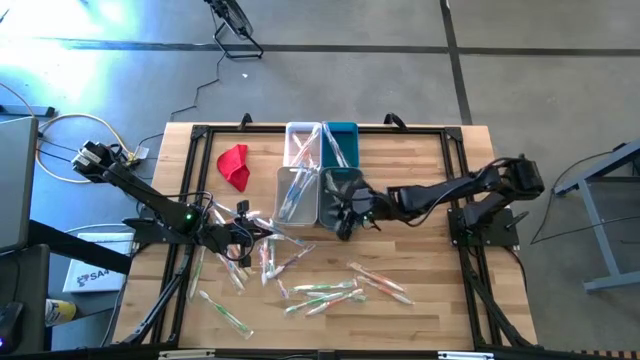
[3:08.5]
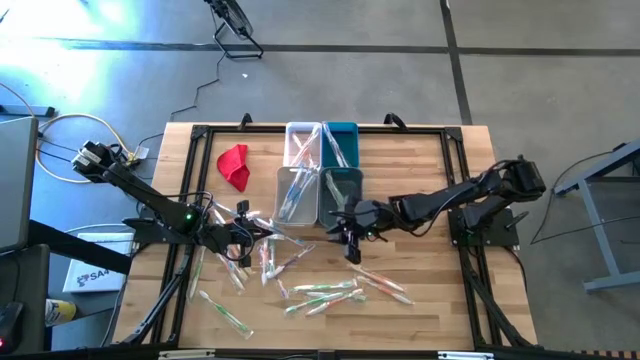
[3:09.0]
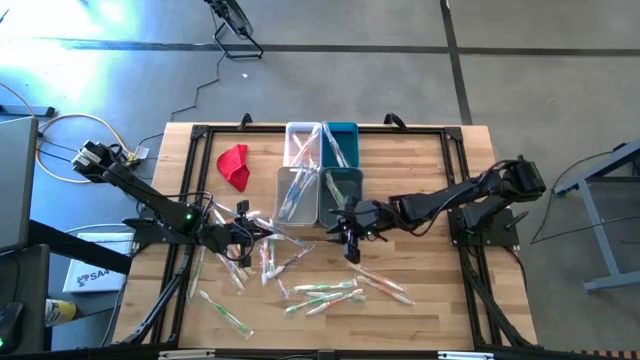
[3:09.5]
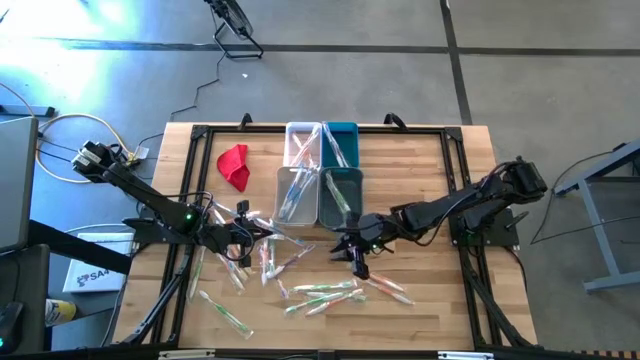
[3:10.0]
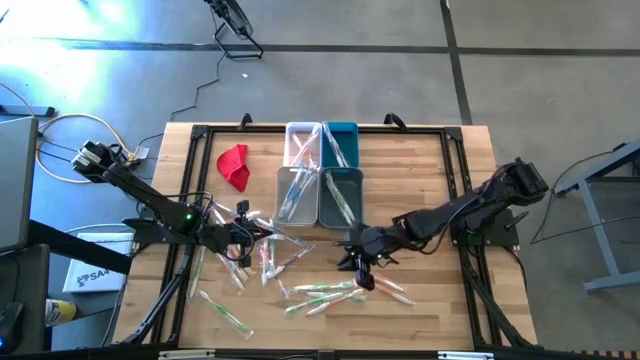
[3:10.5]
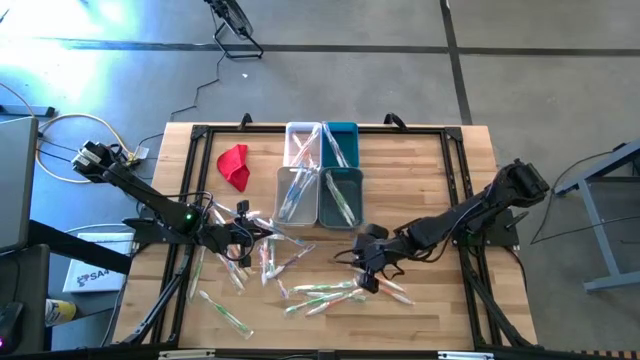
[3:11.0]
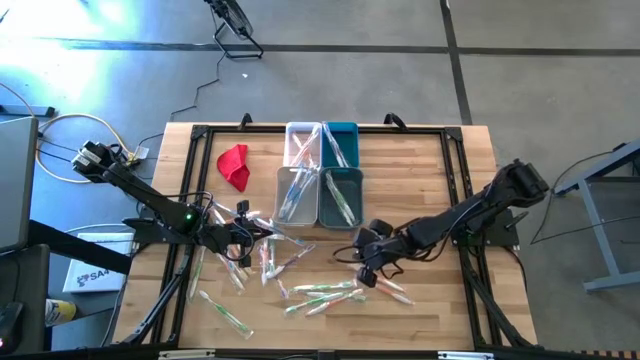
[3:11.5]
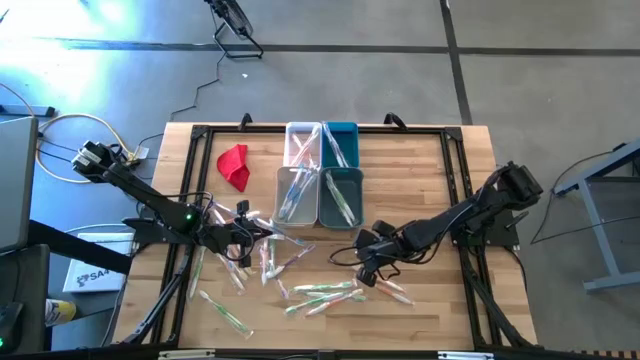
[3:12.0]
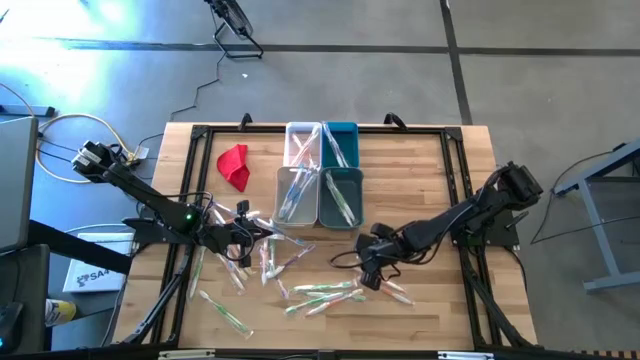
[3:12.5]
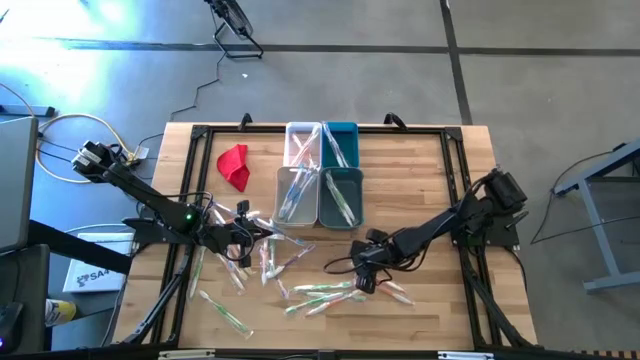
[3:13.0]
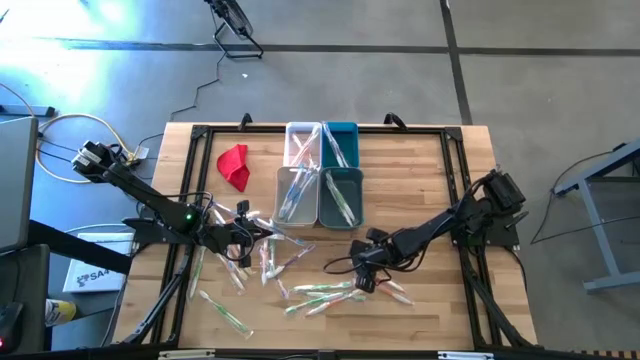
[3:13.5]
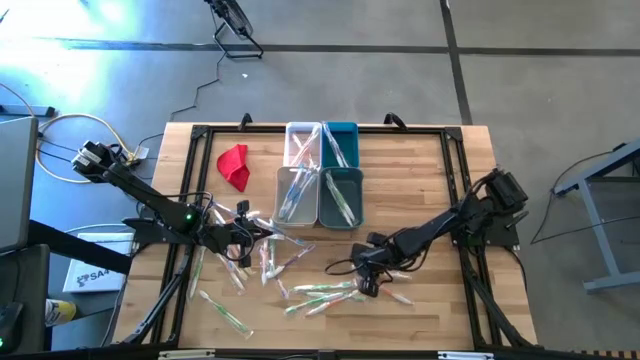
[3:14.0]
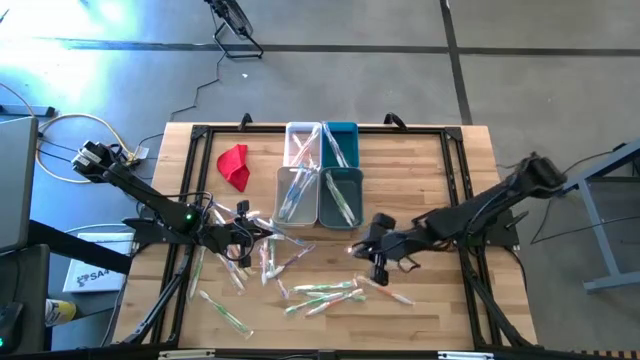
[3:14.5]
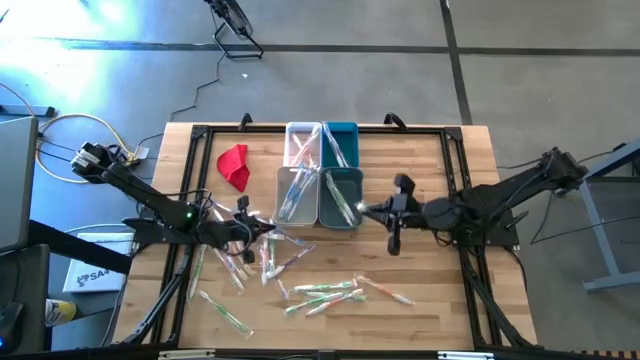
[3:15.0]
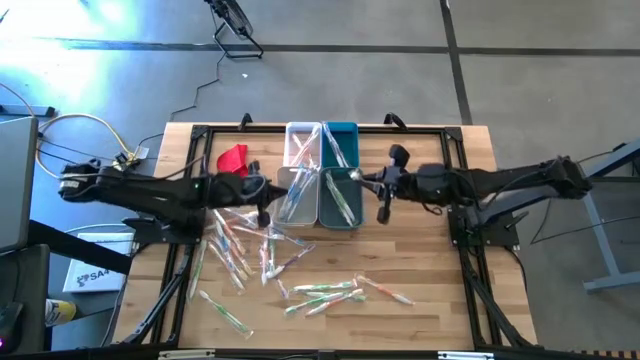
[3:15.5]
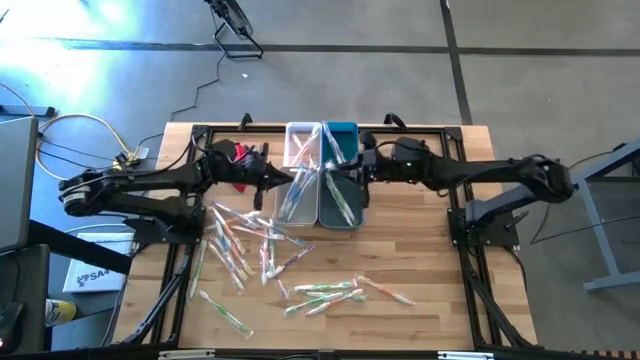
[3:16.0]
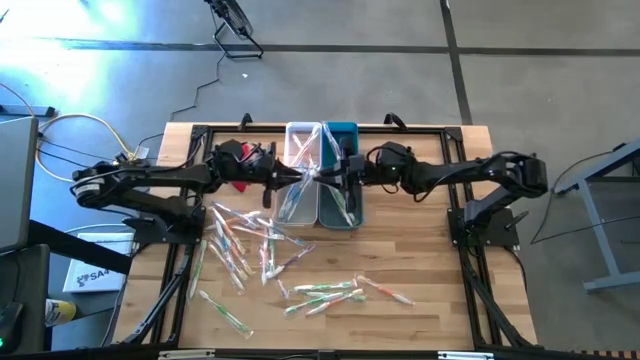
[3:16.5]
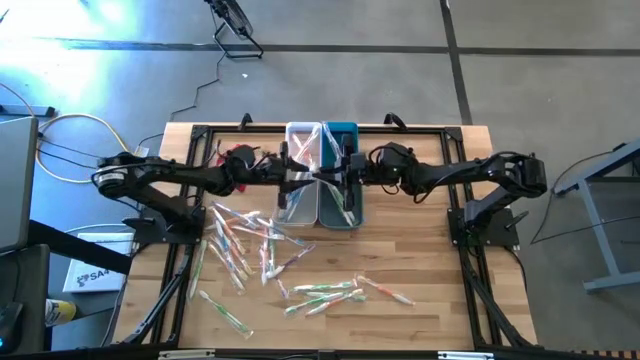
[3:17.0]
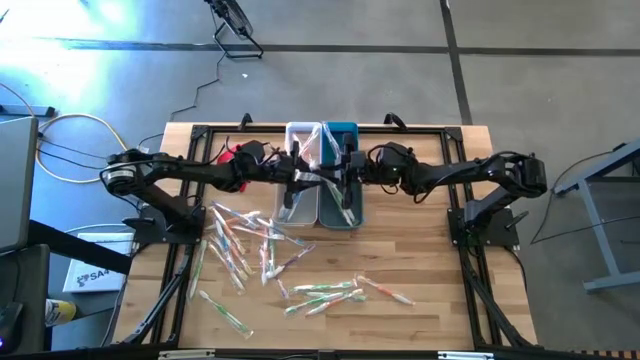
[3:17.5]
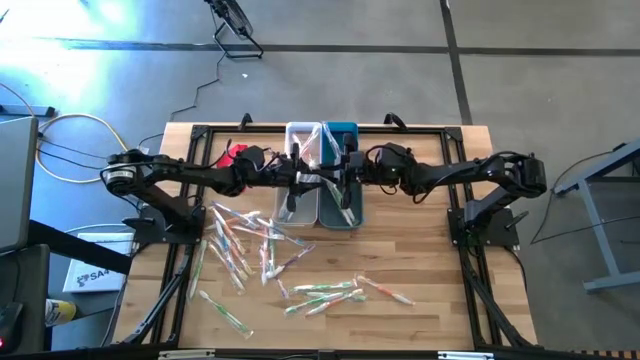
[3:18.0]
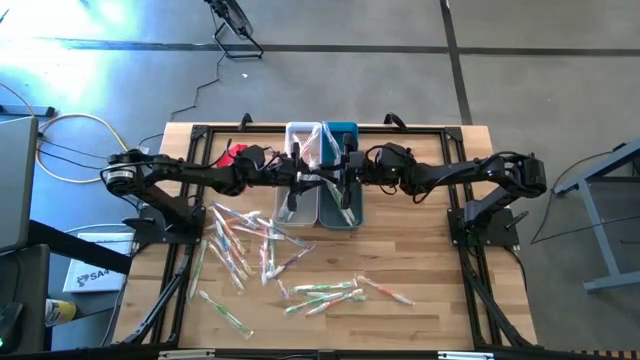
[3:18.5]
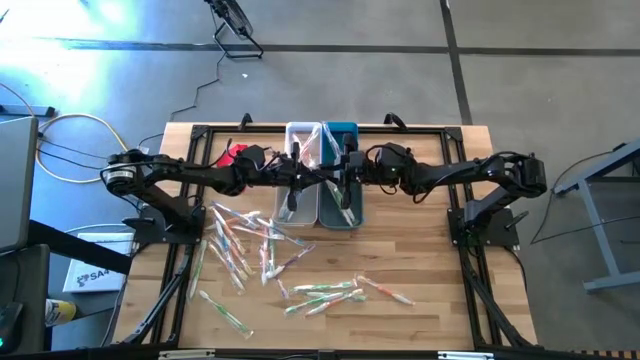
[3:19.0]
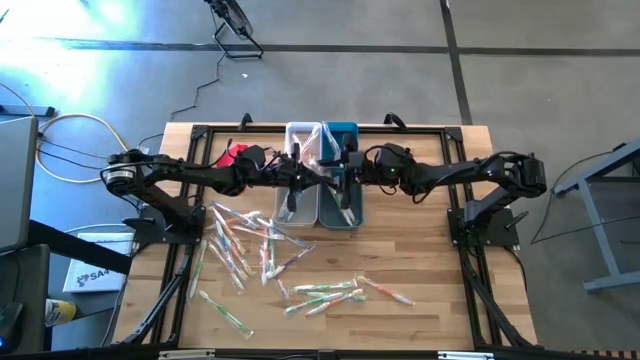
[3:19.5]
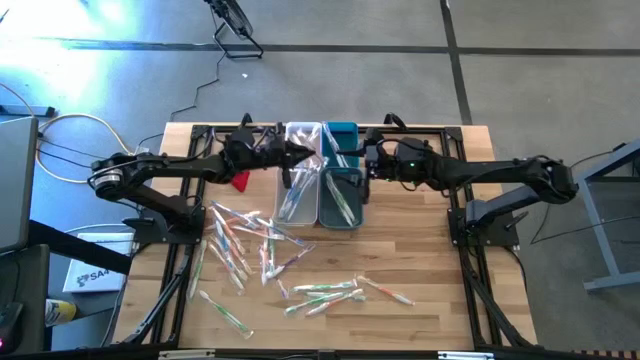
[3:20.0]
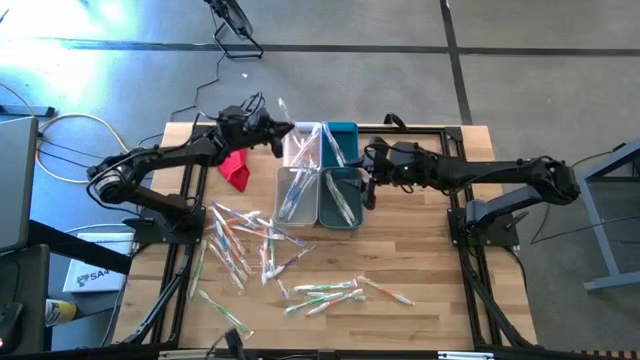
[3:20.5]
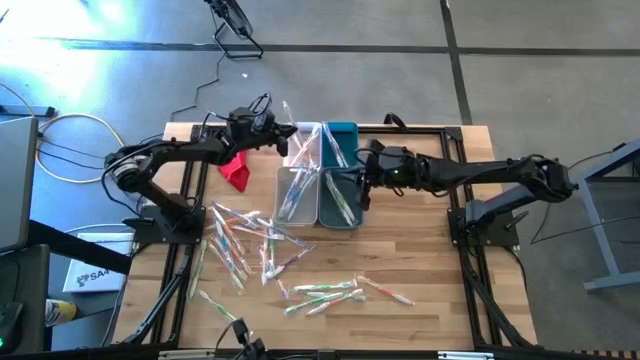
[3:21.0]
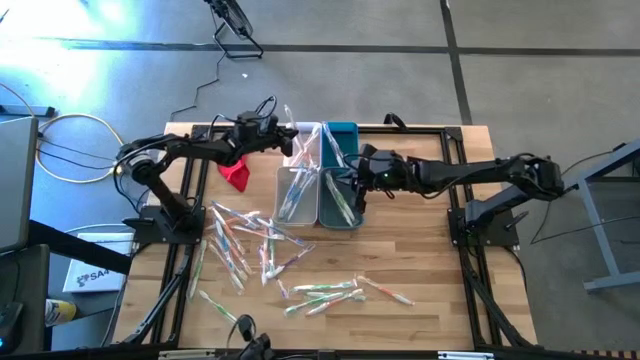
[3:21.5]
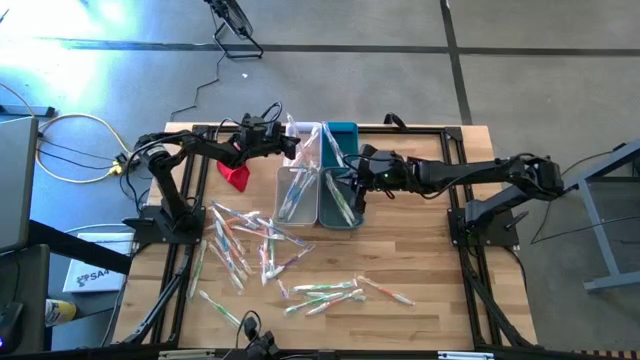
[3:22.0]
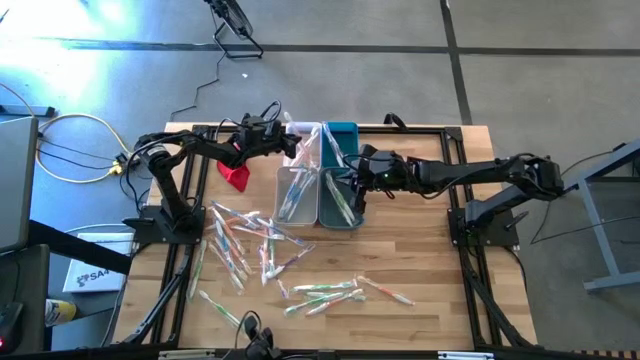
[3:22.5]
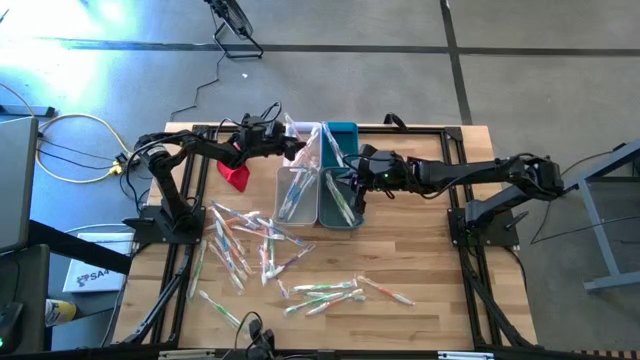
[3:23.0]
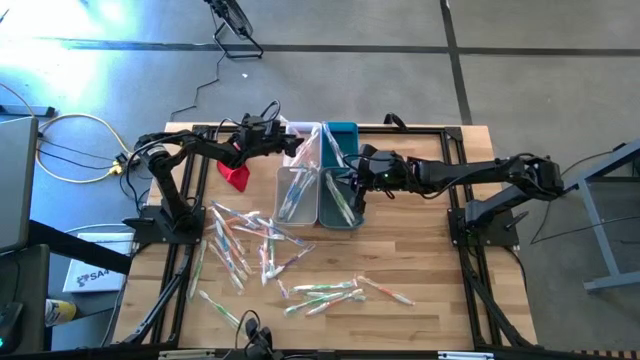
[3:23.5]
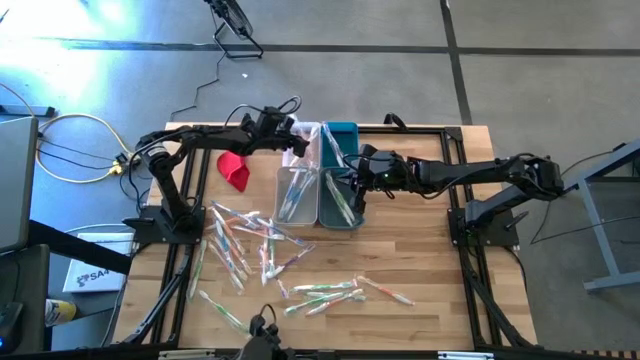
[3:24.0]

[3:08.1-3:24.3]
Task: Pick & Place Toothbrushes
Put the orange toothbrush into the transparent bin

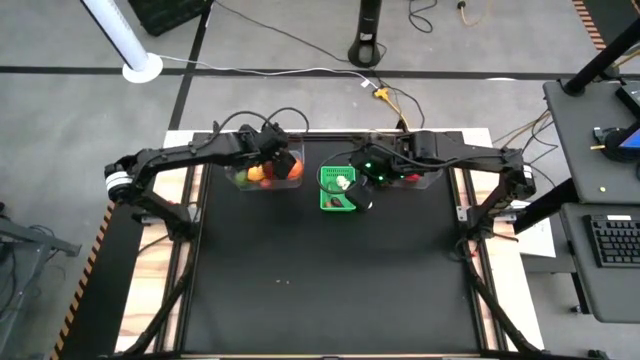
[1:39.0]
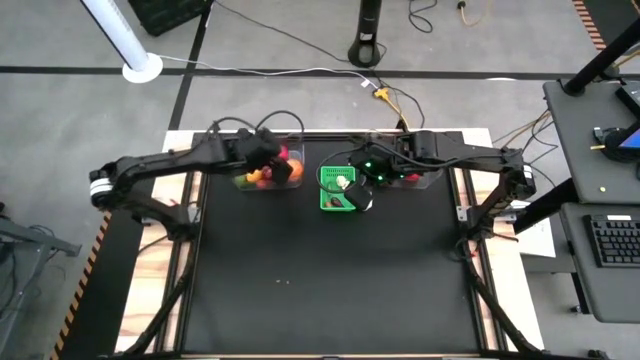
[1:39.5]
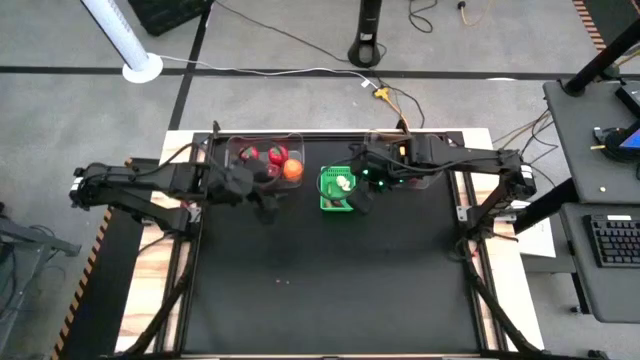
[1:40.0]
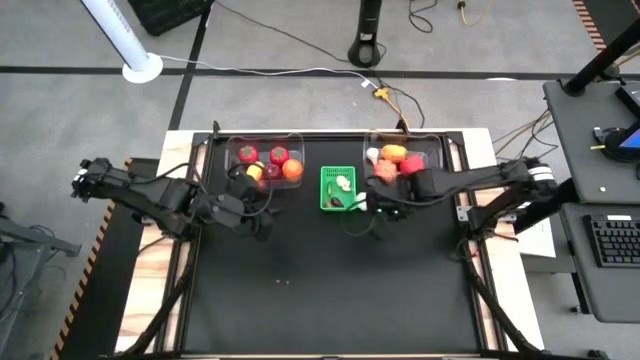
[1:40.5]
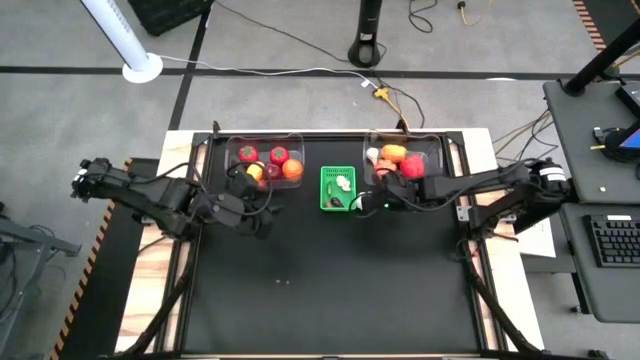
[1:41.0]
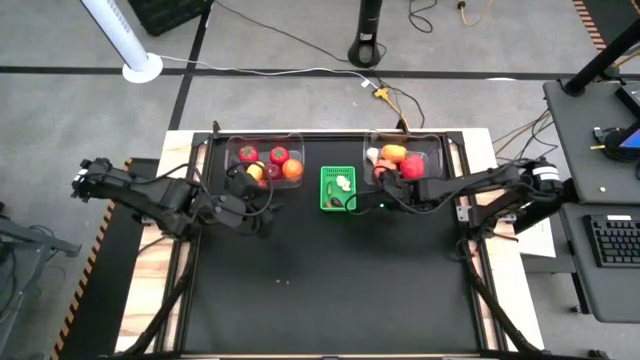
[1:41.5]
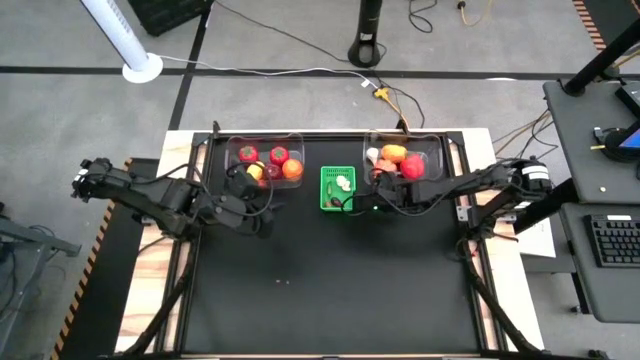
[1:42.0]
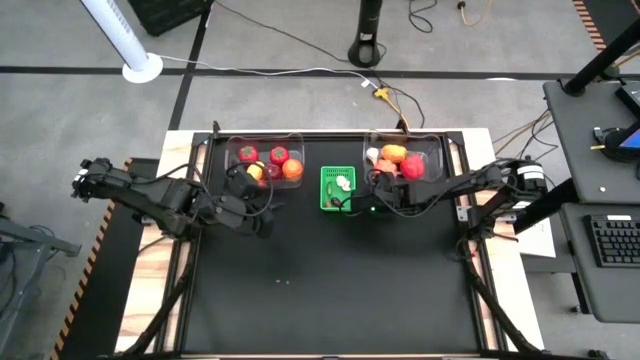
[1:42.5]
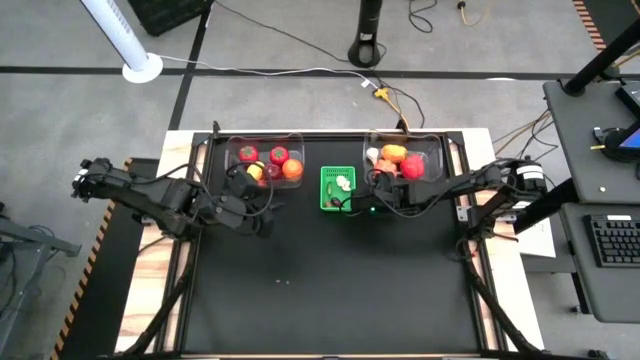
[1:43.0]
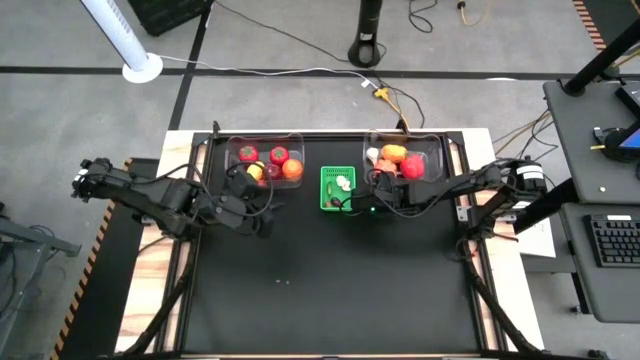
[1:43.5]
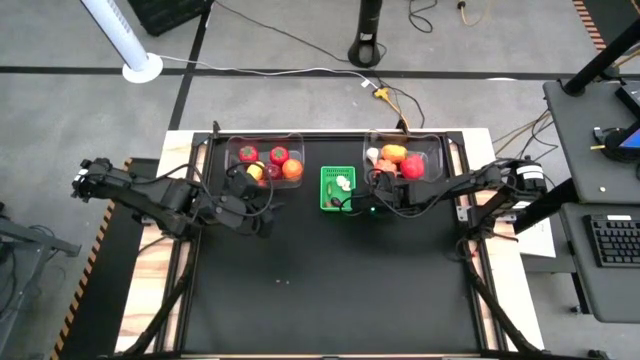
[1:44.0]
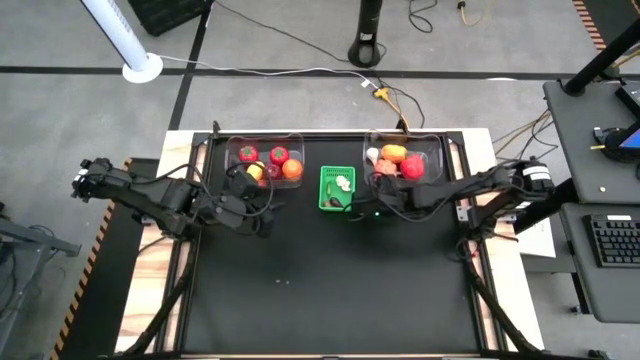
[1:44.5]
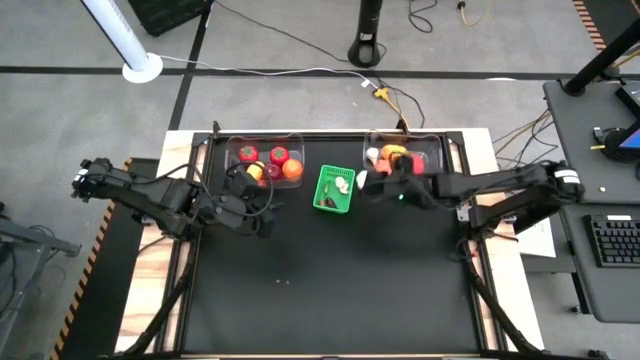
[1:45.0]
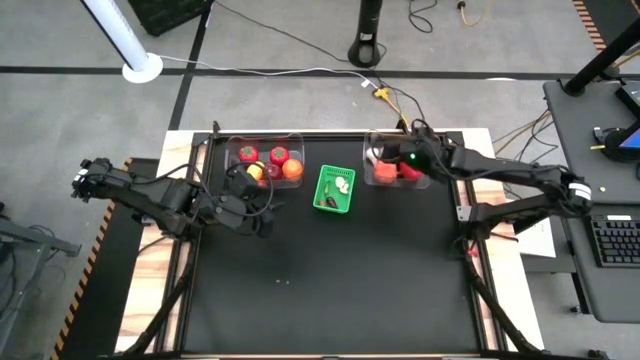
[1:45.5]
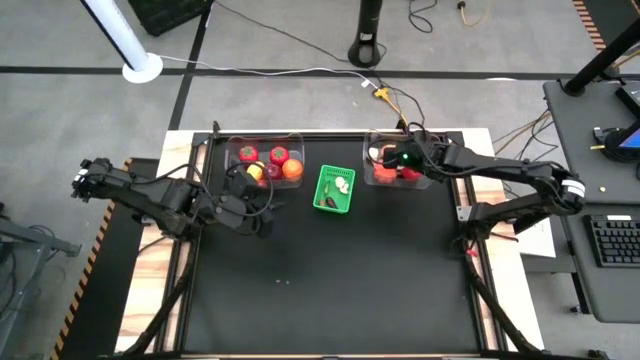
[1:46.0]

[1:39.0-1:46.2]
Task: Sort produce into baskets
Put the garlic into the right transparent bin
